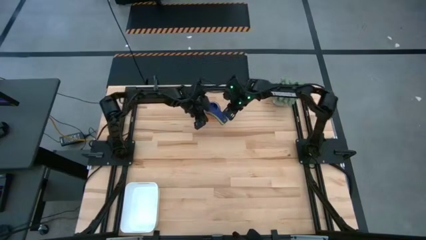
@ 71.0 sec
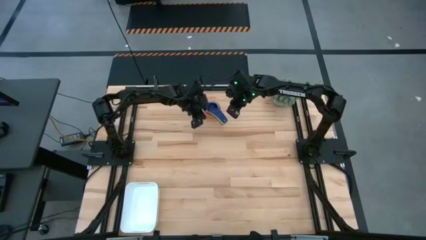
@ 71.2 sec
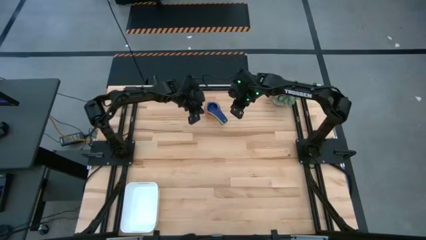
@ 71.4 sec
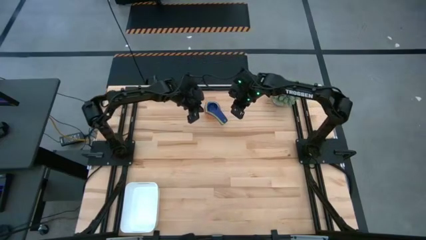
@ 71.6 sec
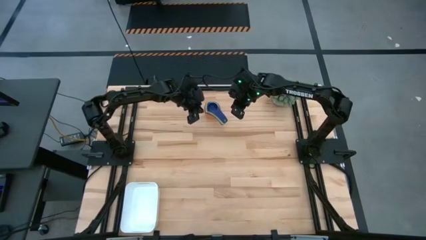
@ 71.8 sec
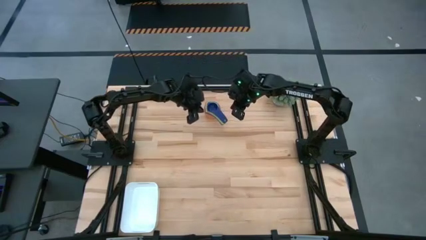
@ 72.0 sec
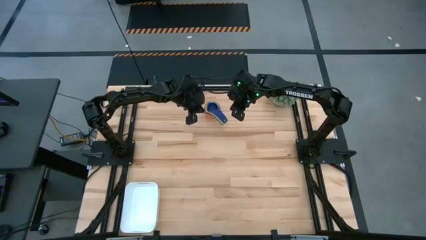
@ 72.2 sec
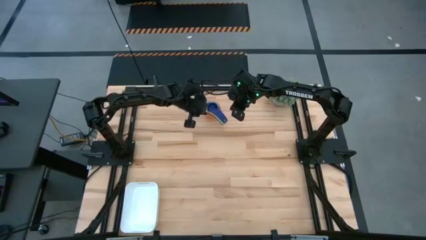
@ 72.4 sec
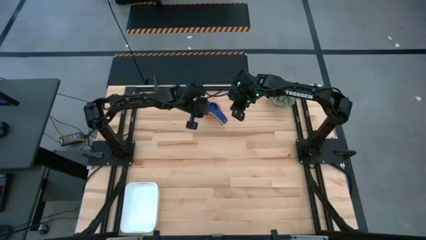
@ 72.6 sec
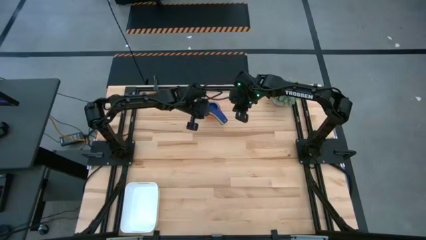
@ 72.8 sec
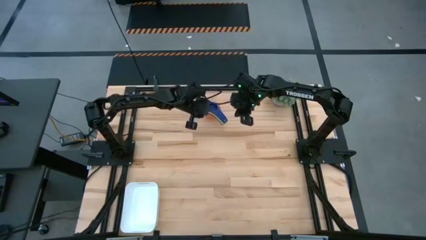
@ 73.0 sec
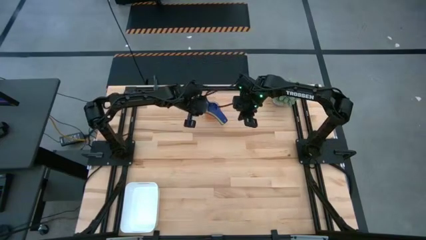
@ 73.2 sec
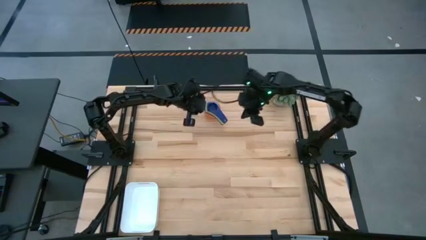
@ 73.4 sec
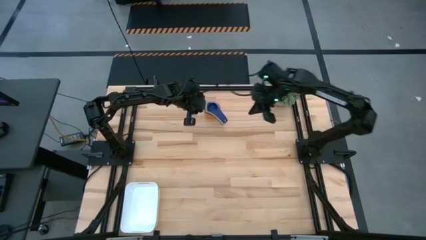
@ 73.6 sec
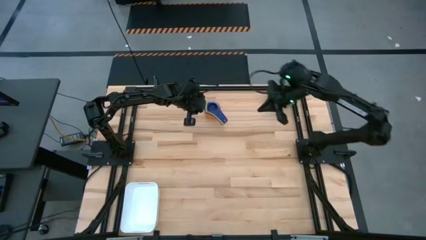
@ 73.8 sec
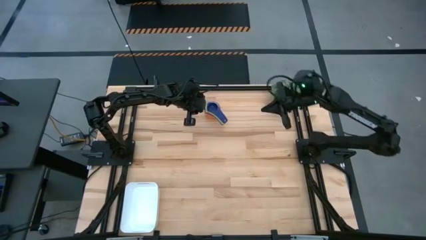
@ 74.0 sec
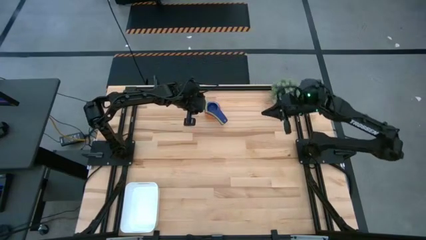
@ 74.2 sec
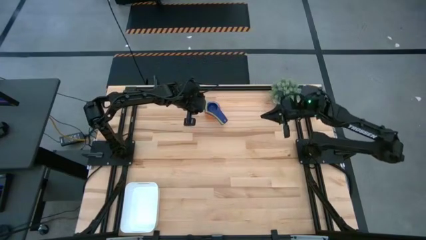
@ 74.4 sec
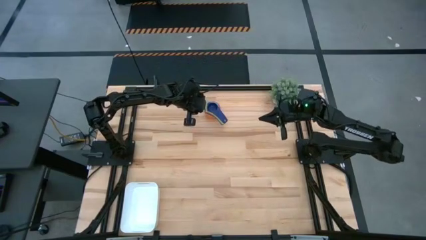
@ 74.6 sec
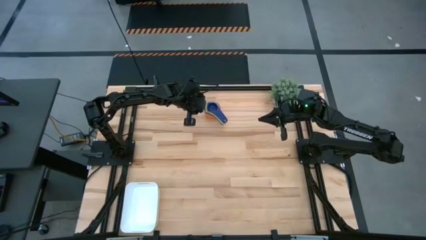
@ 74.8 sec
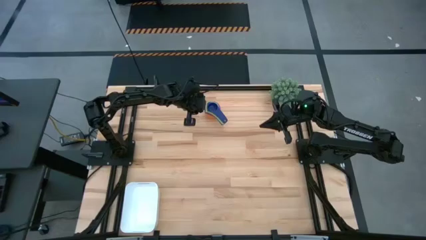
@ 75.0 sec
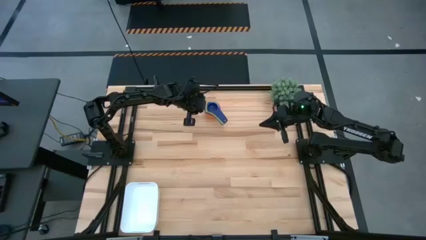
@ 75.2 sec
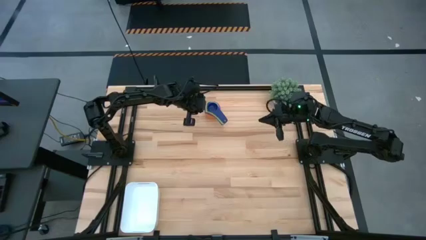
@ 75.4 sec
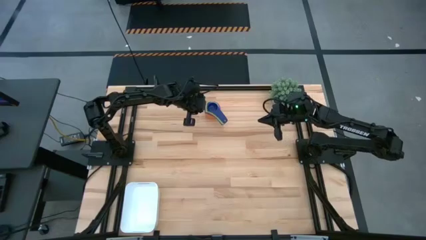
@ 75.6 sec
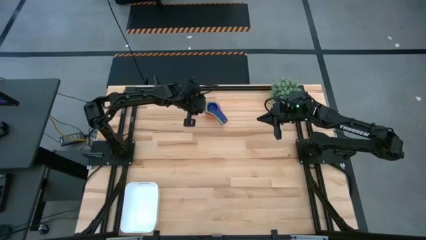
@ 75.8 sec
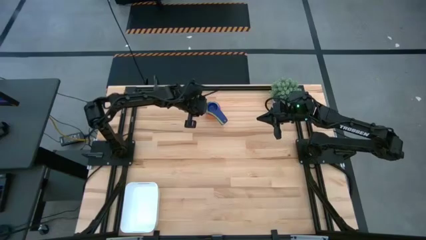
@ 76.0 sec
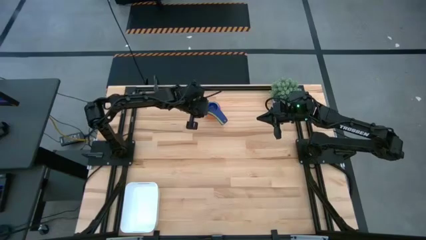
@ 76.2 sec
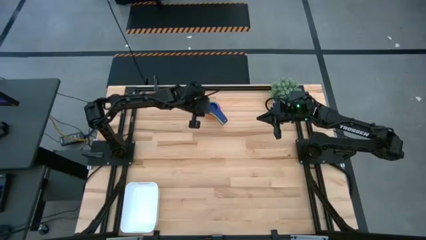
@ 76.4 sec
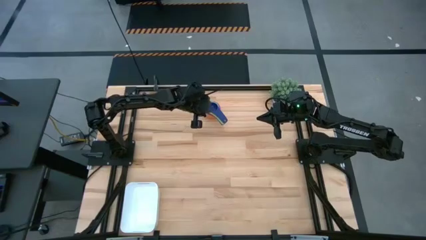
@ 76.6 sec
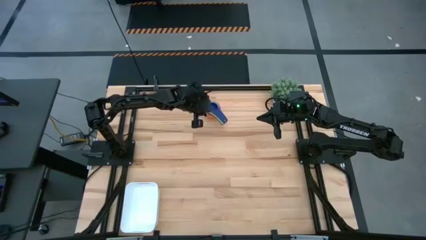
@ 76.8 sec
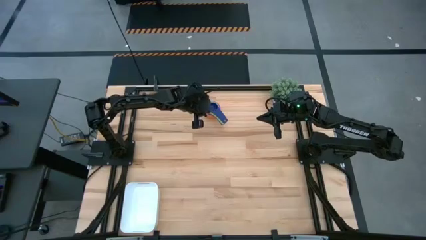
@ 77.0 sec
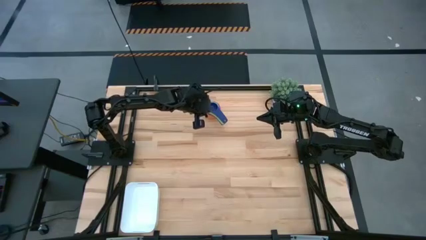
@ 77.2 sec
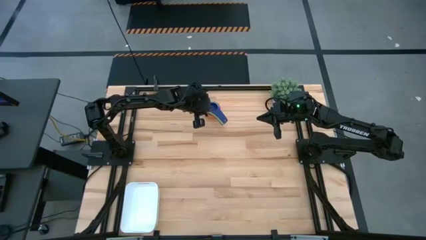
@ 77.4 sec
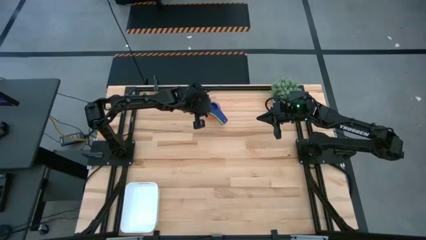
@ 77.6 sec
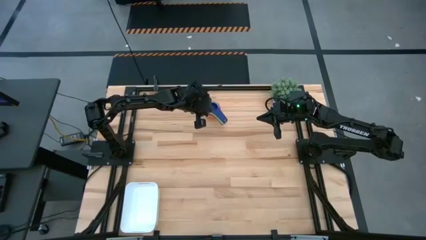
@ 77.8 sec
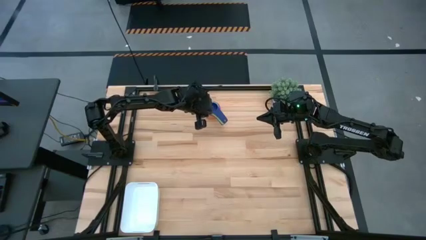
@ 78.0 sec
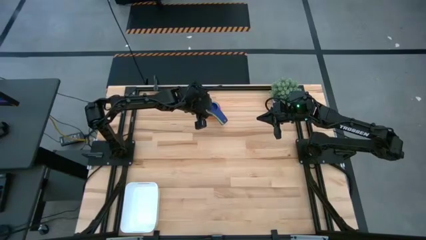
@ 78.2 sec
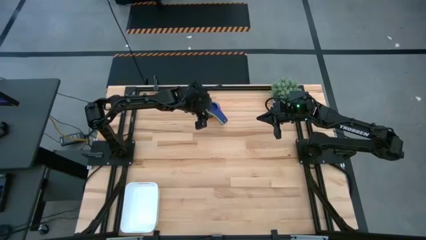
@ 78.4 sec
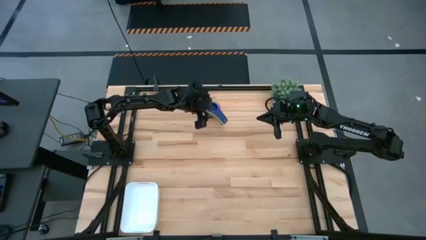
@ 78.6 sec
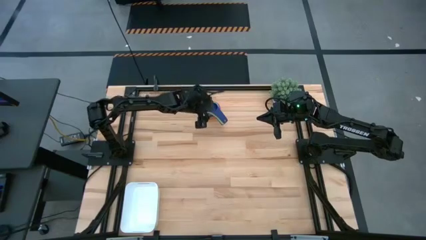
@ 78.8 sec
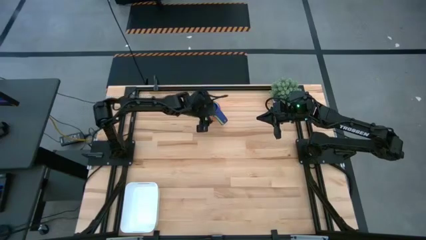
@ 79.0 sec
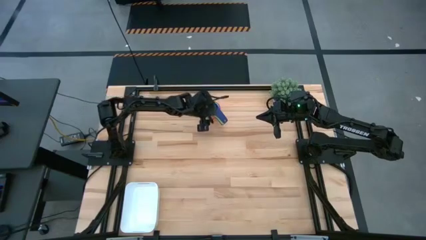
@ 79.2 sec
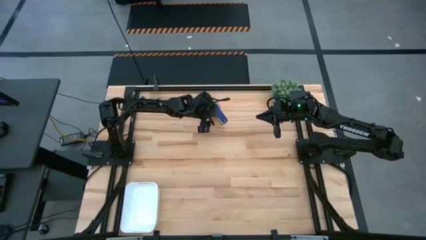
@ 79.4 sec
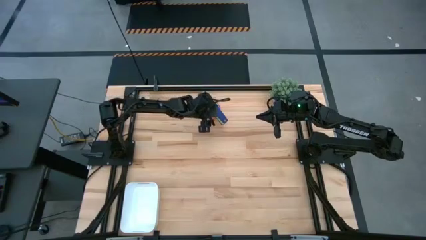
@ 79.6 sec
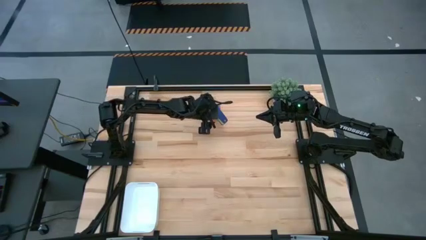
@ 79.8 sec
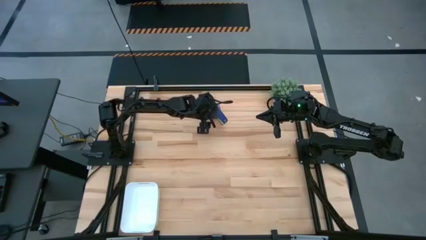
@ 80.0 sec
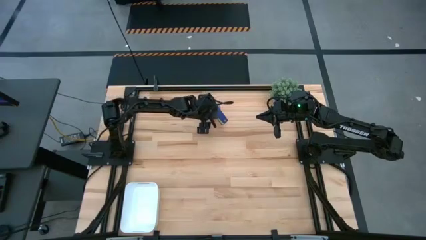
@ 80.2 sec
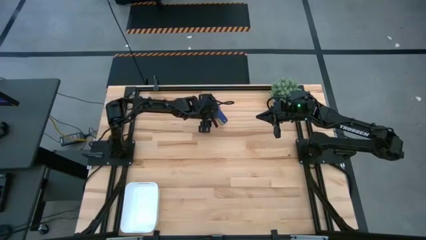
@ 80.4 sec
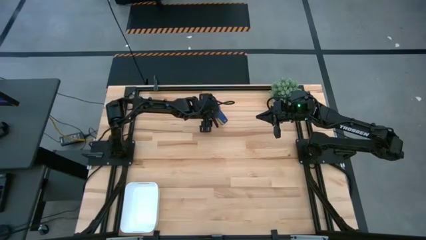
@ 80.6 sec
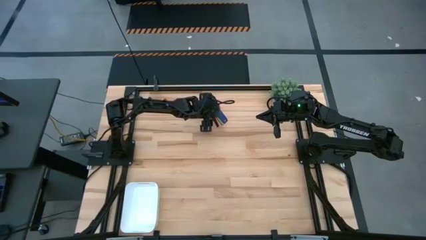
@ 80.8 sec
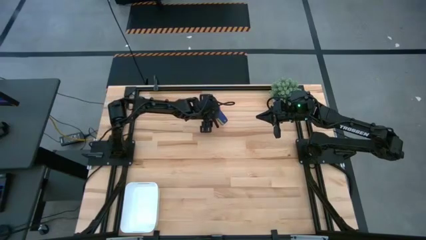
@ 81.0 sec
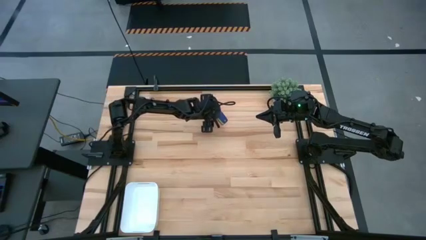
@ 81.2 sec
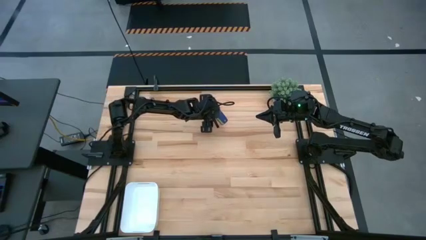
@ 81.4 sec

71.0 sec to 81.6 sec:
Task: Nest measuring cups in basket
Put the stacked measuring cups into the white bin
